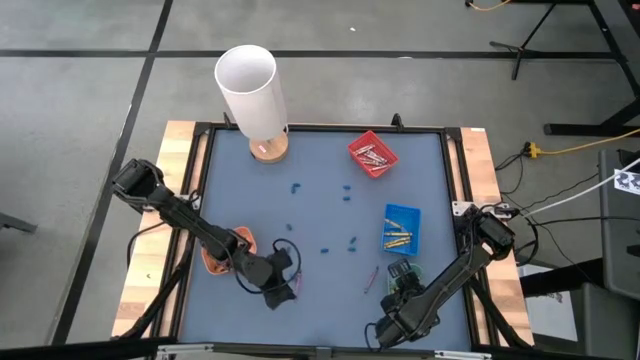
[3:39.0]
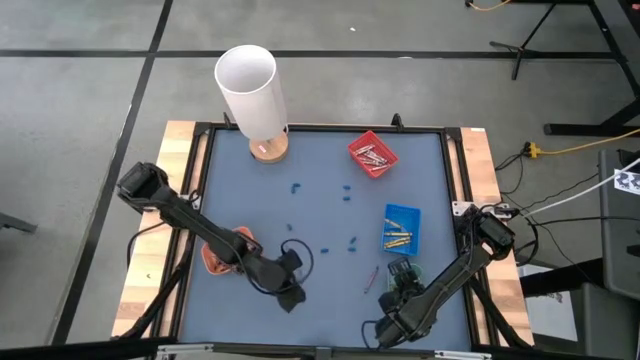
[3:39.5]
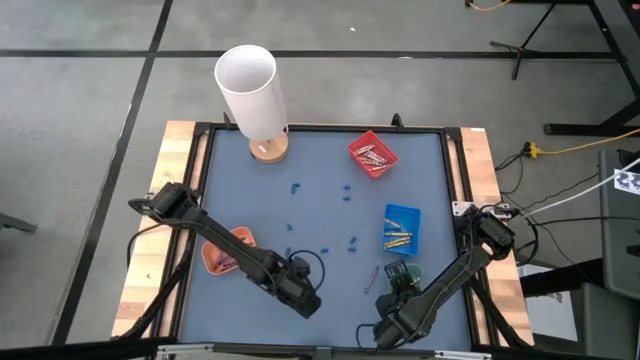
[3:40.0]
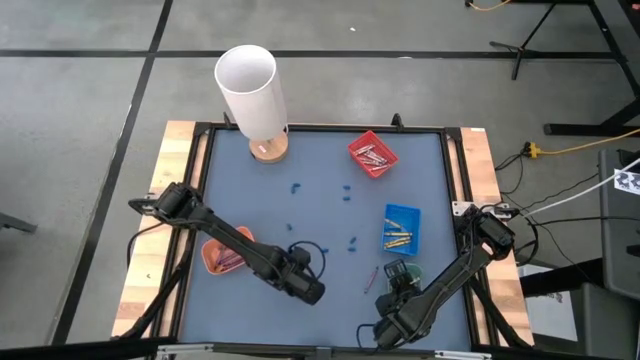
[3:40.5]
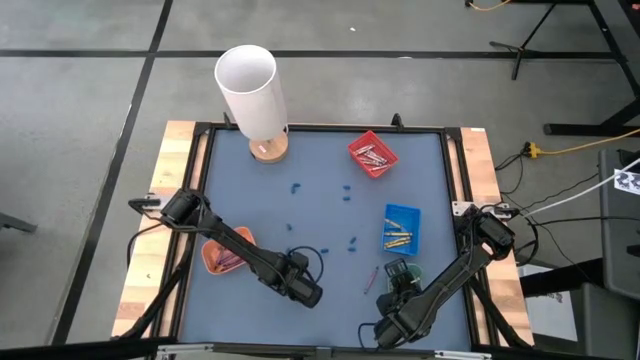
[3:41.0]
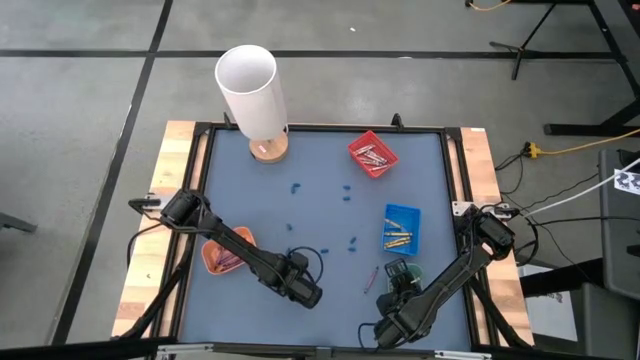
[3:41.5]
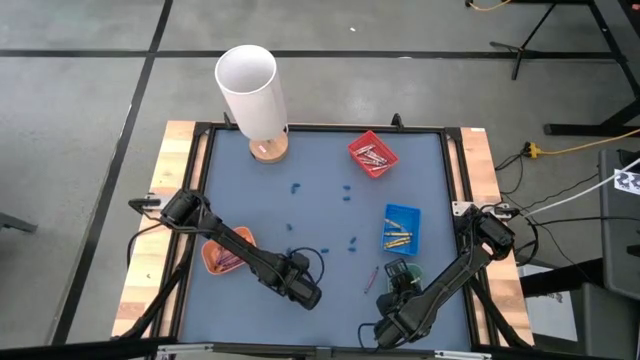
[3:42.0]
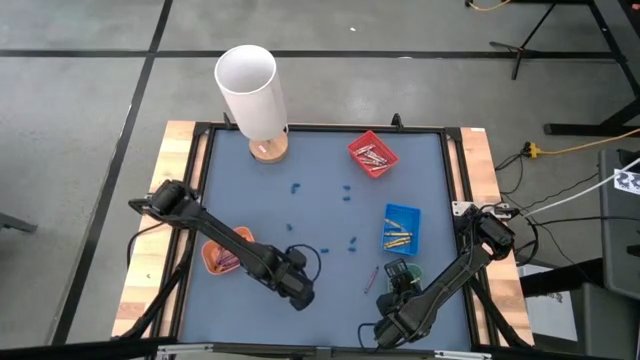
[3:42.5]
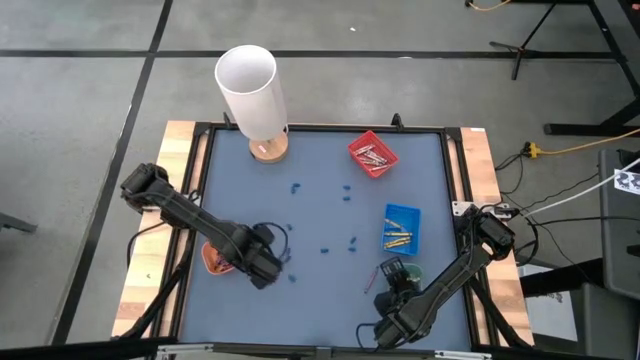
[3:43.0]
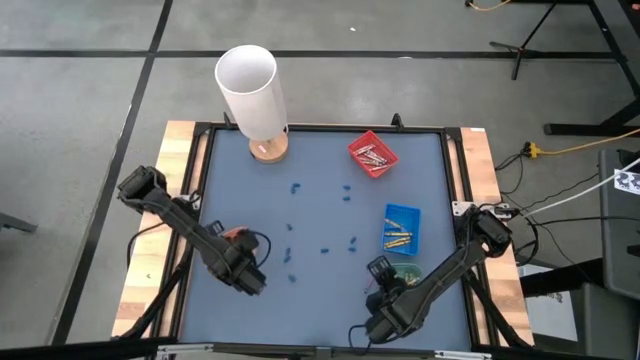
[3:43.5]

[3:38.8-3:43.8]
Task: Sort crayons
Put the violet crayon into the orange bin

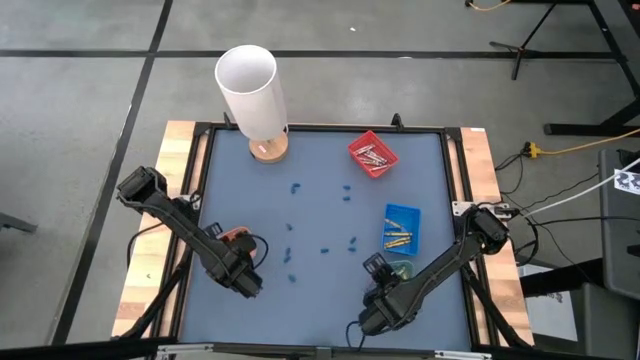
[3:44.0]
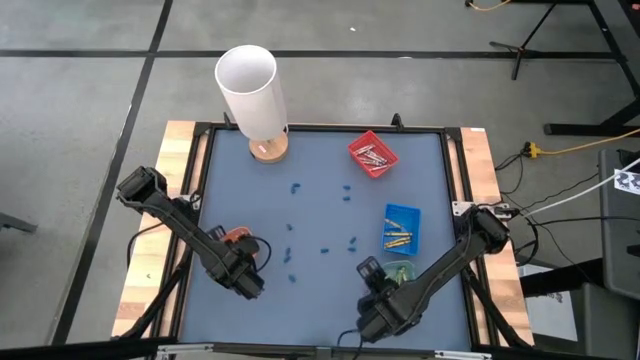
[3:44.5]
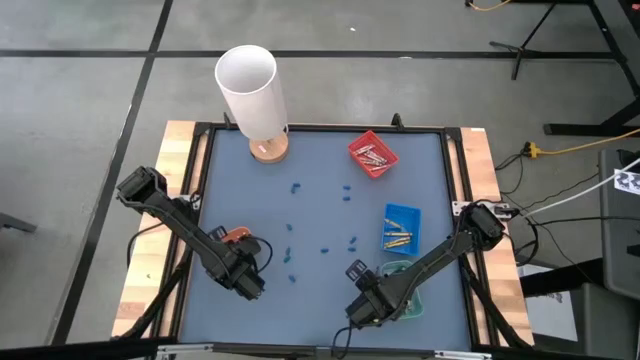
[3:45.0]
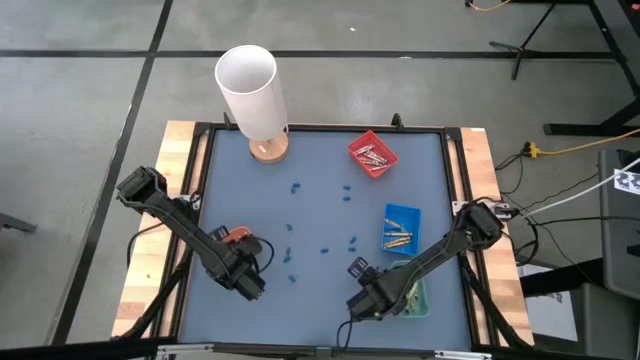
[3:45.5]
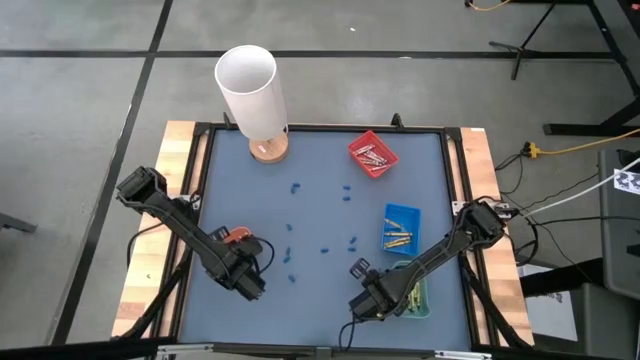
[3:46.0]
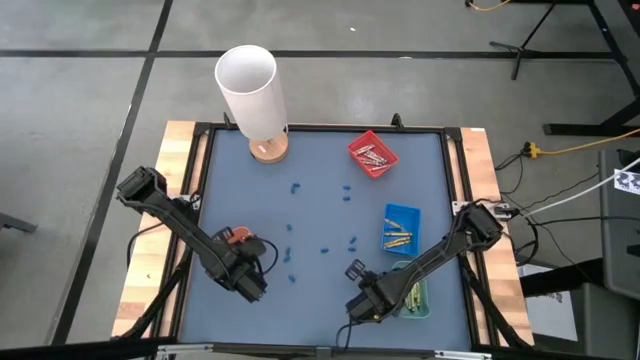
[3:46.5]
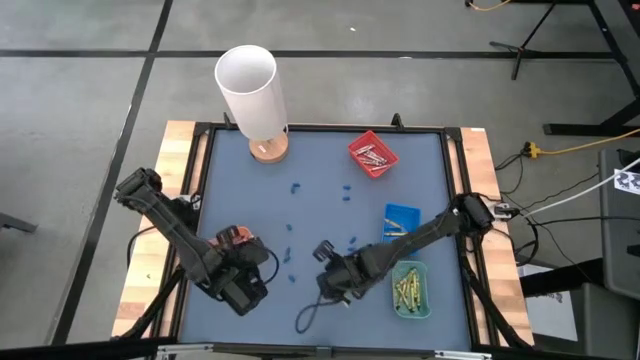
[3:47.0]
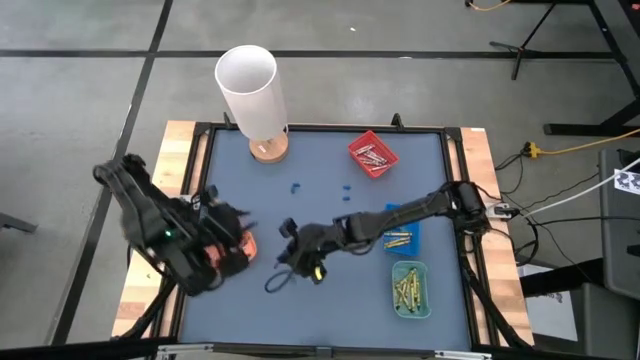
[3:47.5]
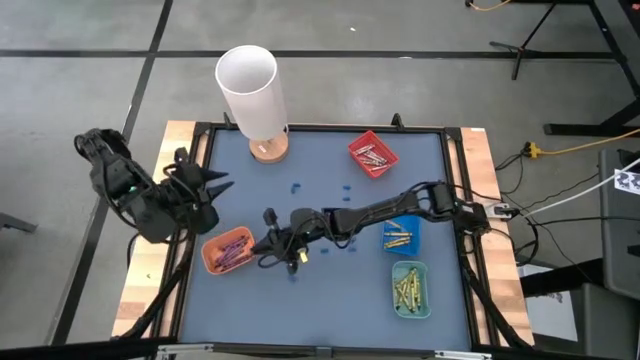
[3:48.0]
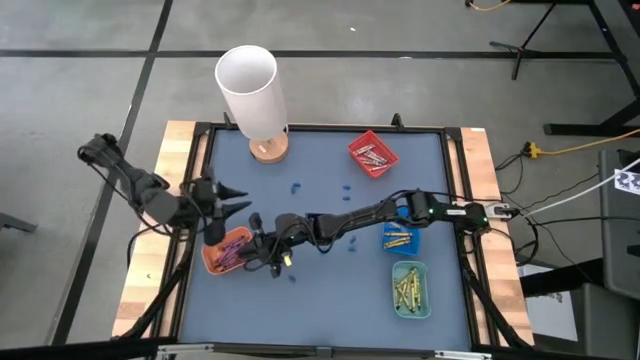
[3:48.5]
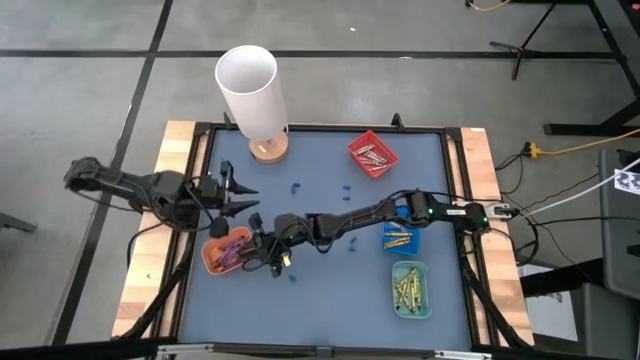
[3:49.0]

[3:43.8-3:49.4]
Put the violet crayon into the orange bin

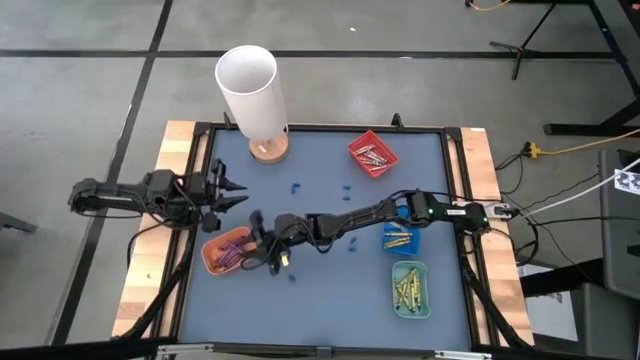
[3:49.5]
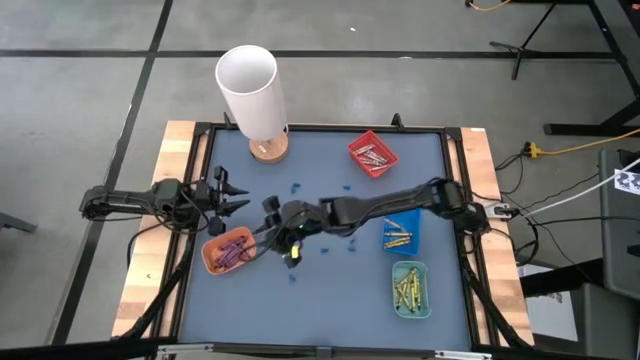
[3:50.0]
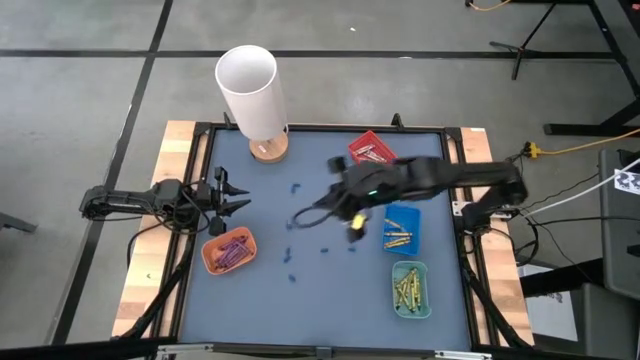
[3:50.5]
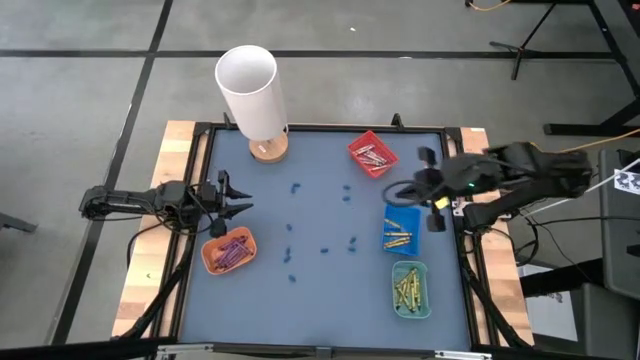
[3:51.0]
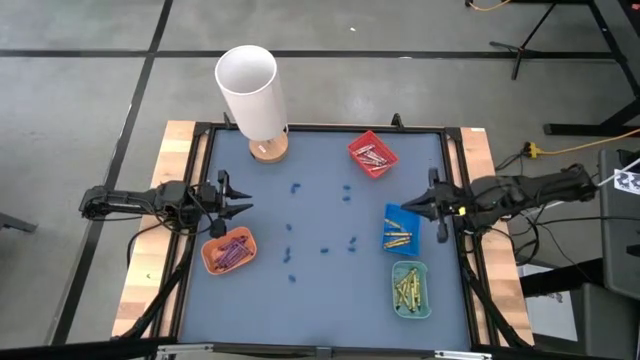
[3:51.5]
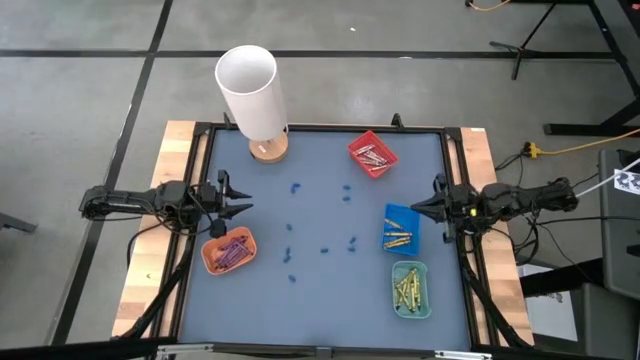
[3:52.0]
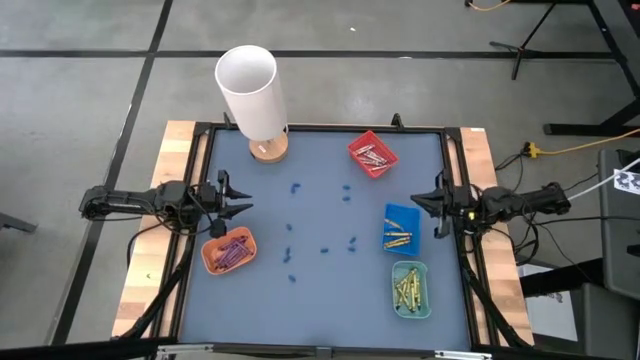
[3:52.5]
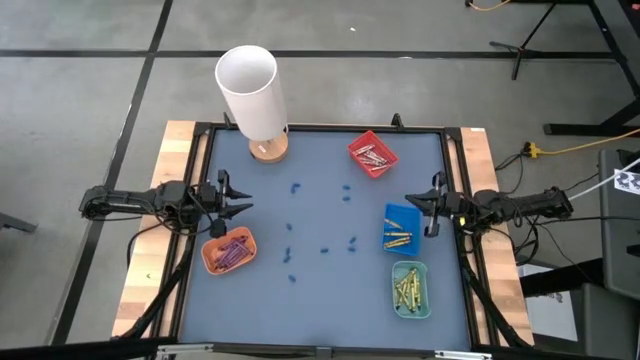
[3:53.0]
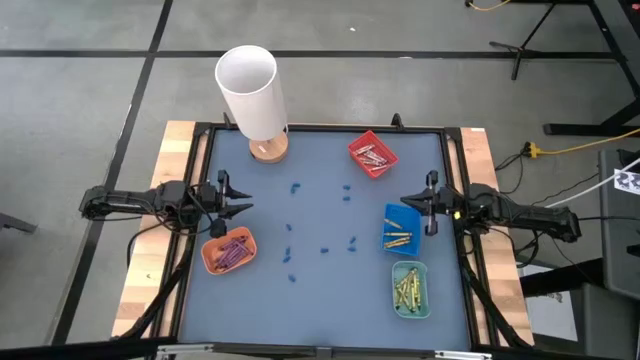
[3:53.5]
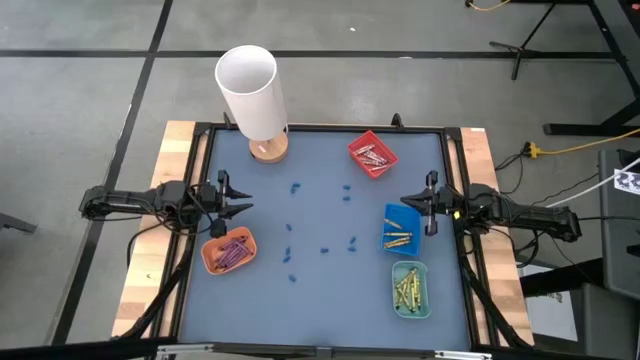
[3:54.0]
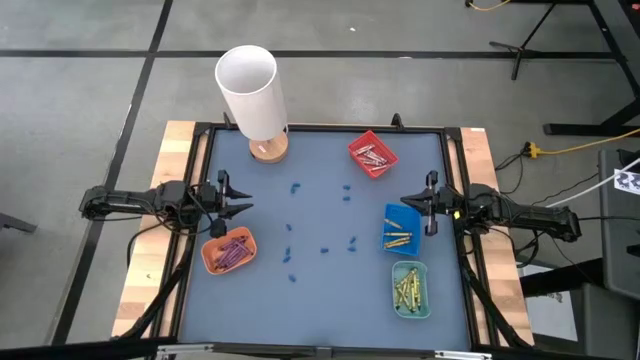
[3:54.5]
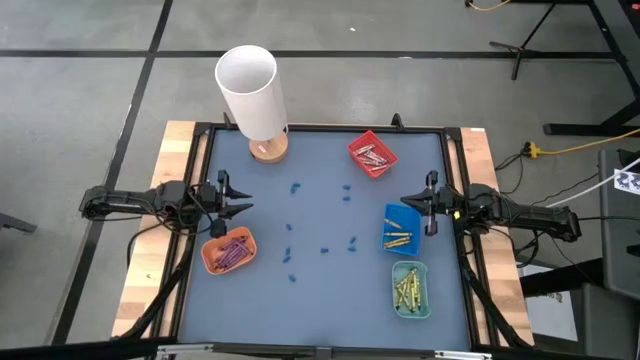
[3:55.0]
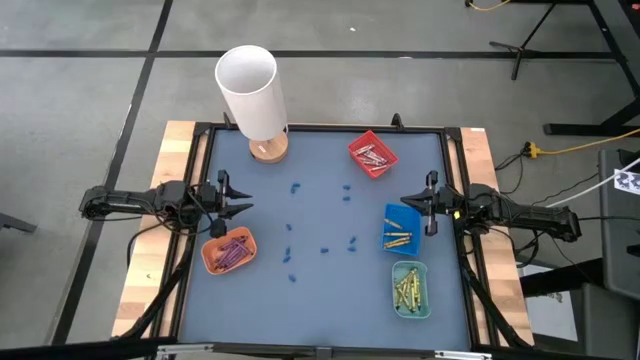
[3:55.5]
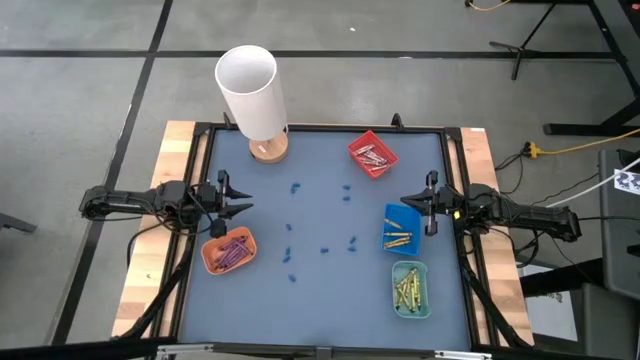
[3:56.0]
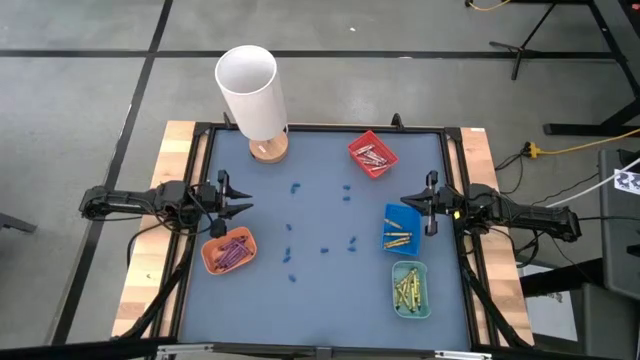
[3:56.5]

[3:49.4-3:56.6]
Return to Home Position
